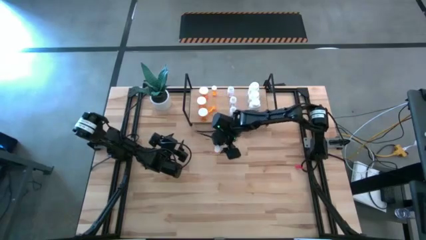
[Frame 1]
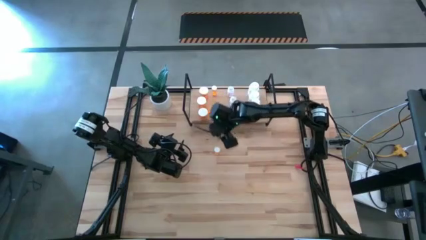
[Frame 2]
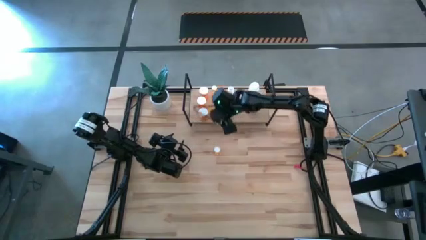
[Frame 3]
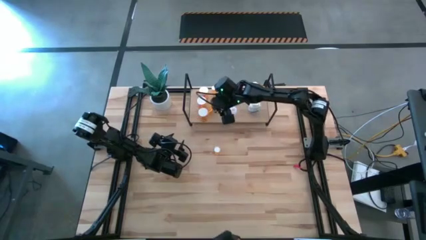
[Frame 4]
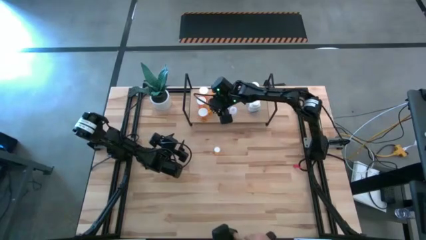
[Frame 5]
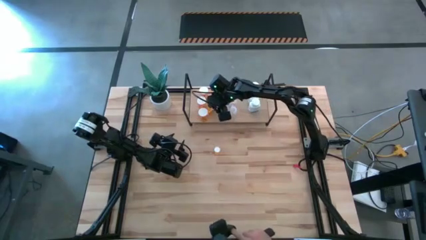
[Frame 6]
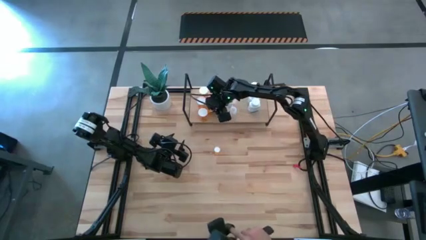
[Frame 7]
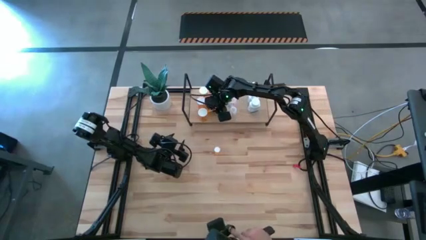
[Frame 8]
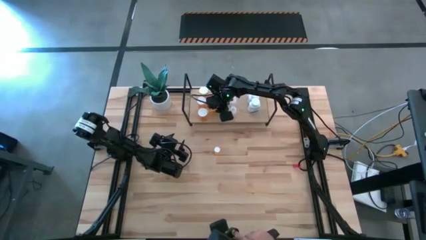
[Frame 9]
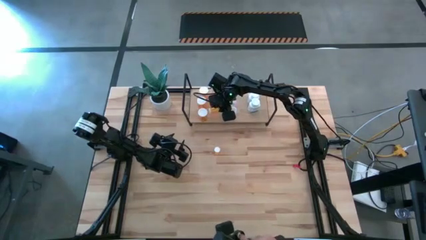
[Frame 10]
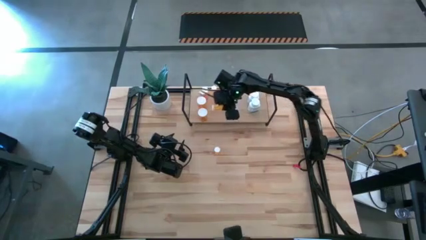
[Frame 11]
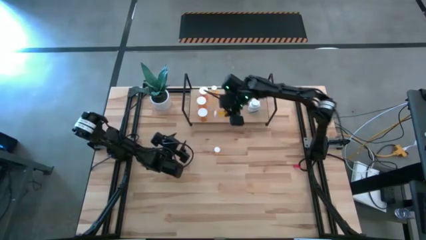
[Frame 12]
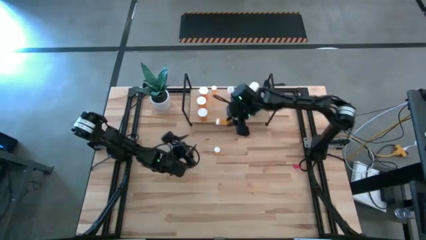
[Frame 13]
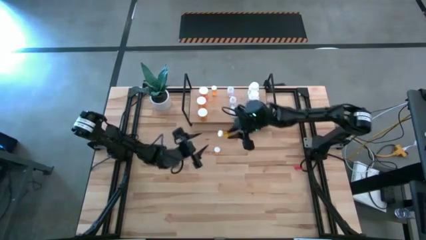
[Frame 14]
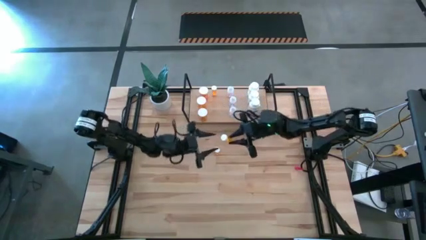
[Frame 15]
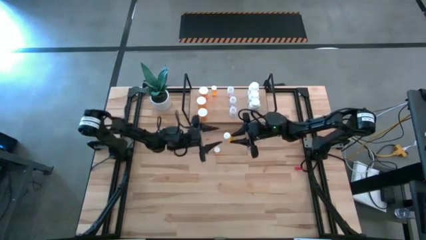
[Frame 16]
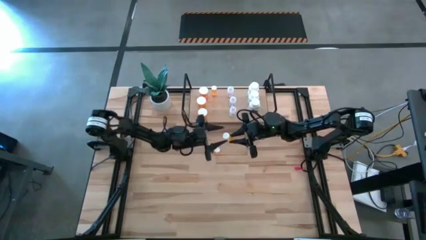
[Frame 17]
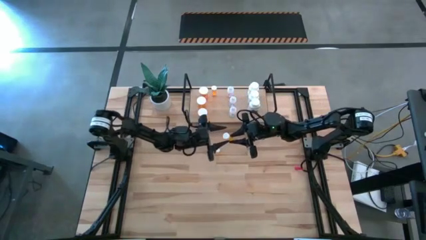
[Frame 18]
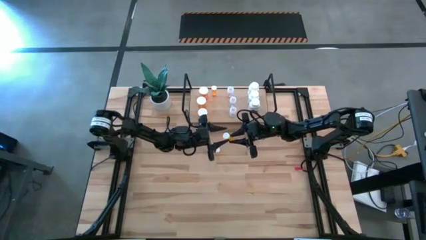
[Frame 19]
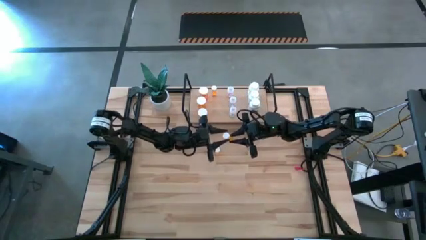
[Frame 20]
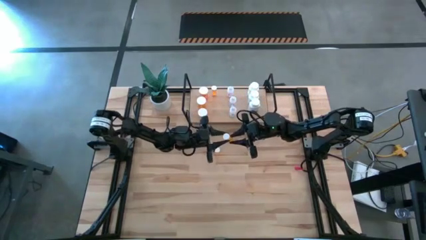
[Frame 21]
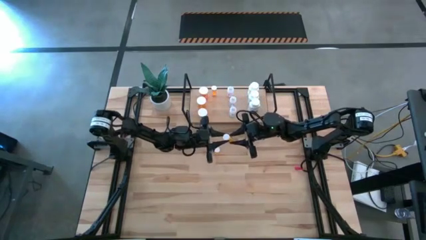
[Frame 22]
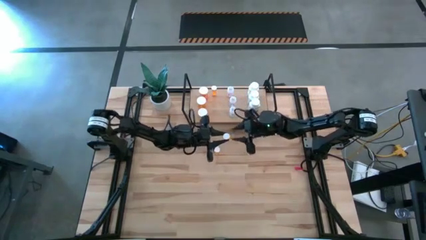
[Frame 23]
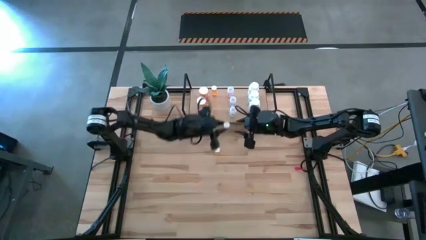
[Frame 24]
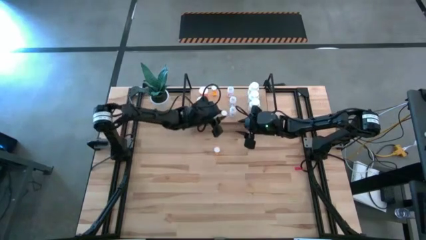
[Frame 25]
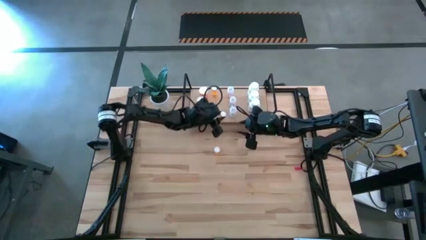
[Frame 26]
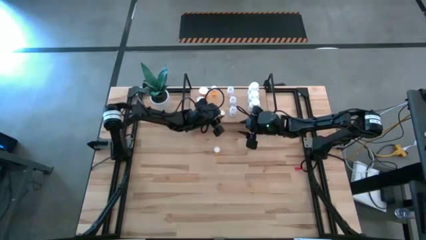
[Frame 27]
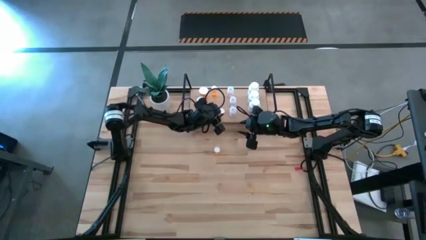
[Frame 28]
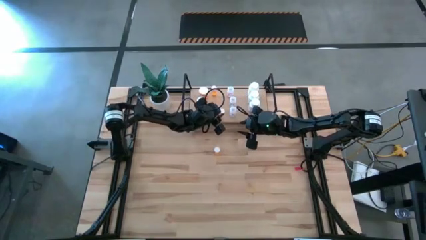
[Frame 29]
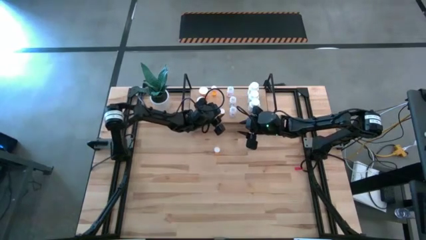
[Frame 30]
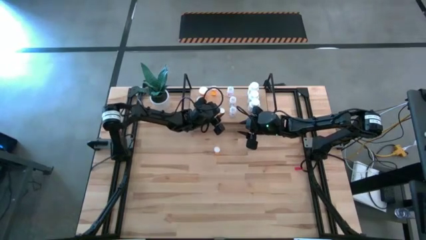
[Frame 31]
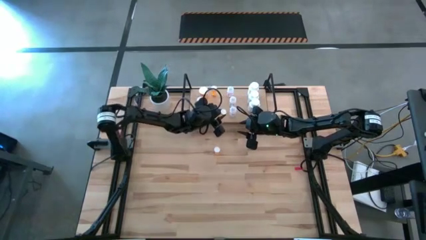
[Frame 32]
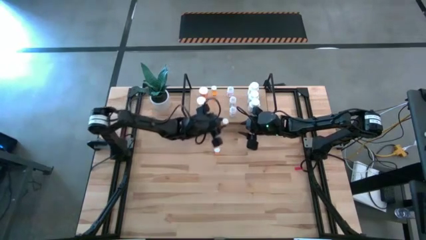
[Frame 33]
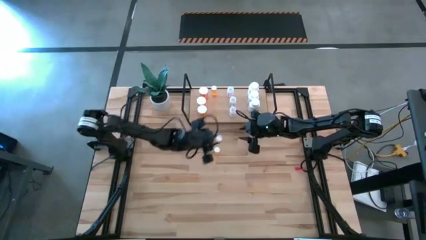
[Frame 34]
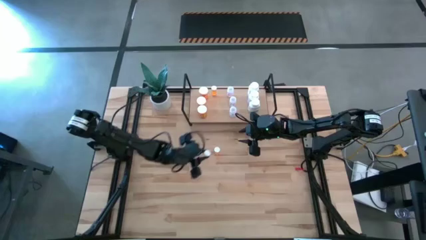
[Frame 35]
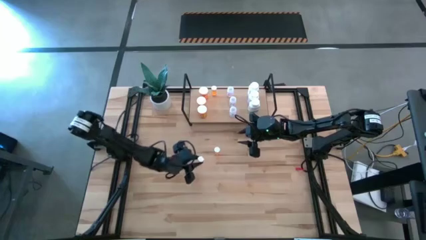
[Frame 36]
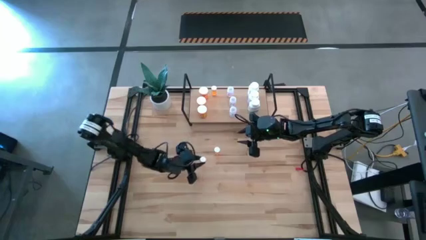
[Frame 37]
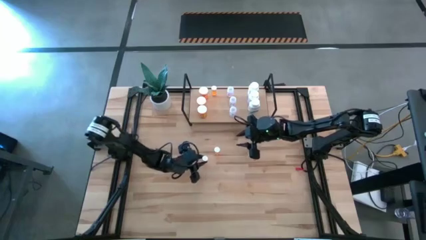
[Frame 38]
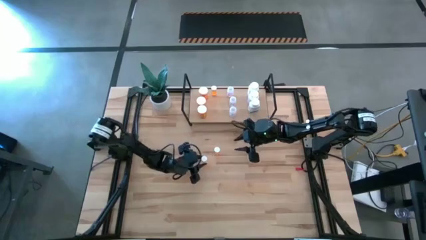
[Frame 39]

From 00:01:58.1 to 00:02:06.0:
Task: Pick and place medicine bottles onto shelf by color
Remove the small orange pill bottle from the shelf

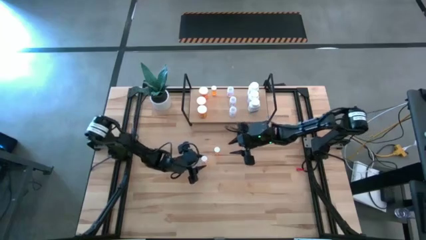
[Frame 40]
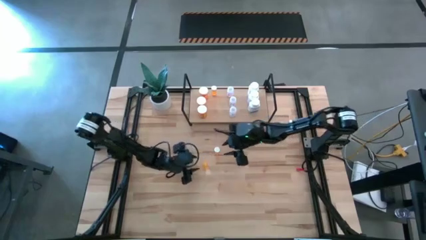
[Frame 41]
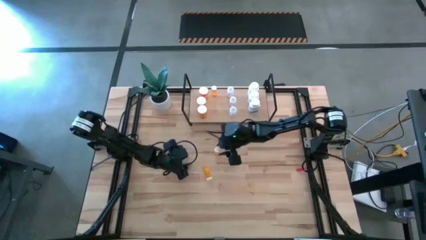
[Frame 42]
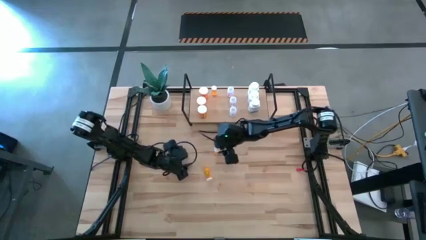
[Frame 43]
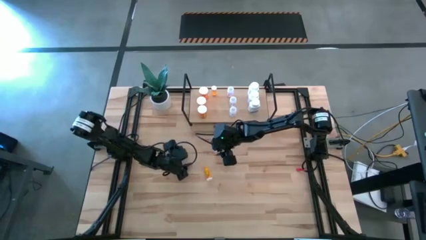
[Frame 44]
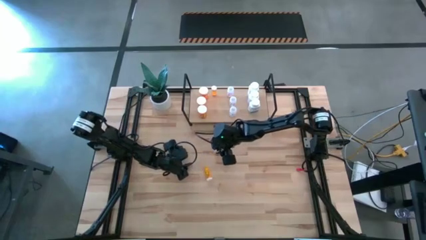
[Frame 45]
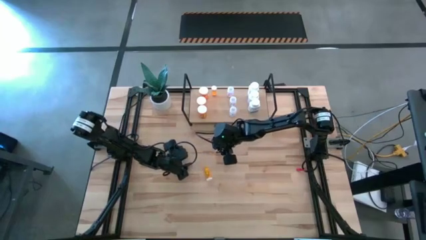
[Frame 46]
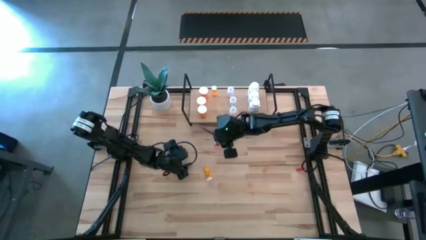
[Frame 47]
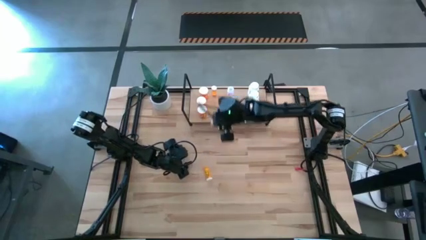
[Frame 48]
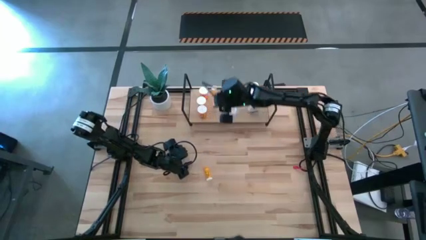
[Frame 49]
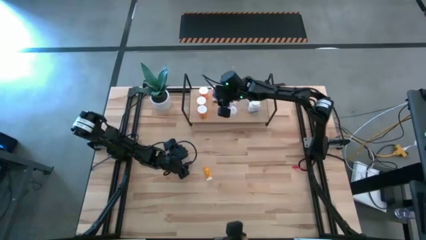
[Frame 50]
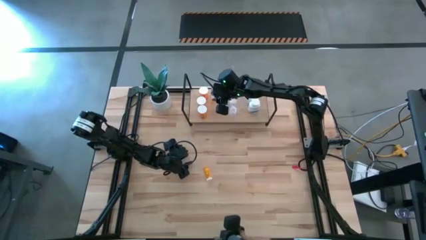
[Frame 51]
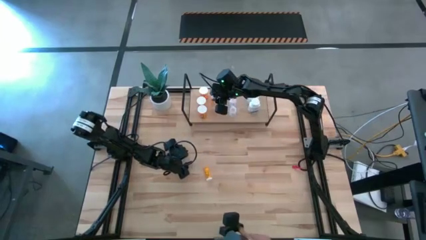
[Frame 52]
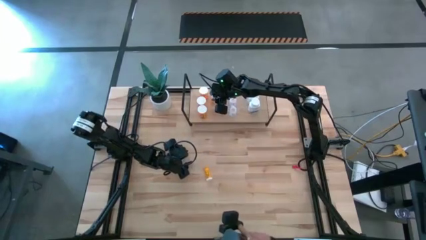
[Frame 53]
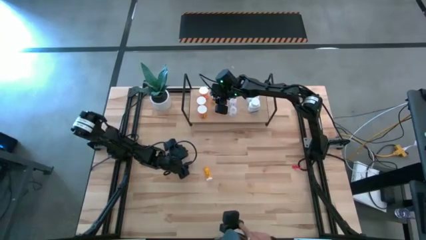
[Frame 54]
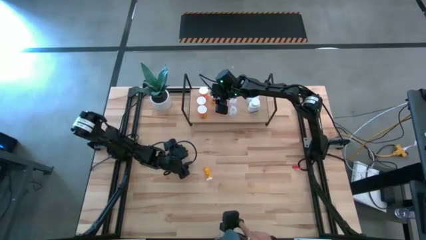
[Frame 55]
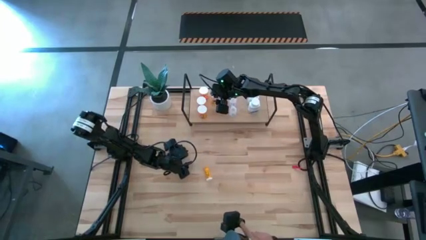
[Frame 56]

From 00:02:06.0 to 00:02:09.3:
Put the top small orange pill bottle on the shelf aligned with the small orange pill bottle

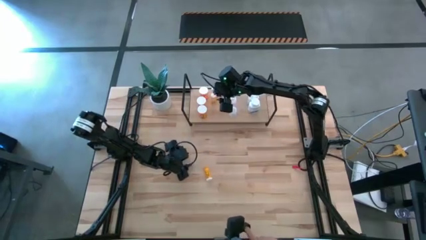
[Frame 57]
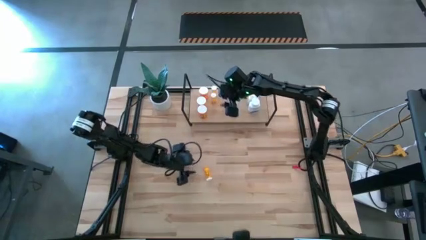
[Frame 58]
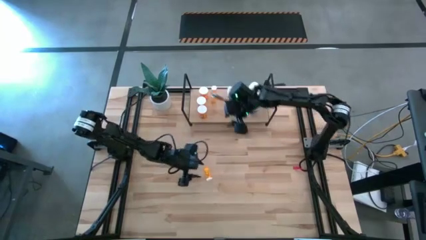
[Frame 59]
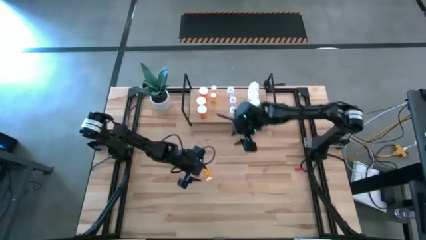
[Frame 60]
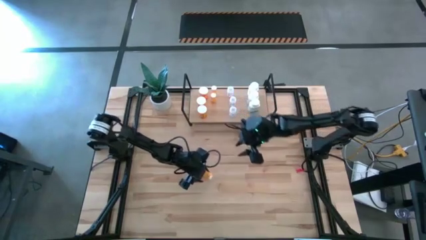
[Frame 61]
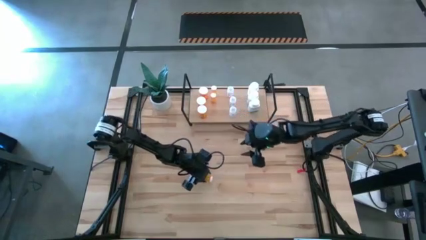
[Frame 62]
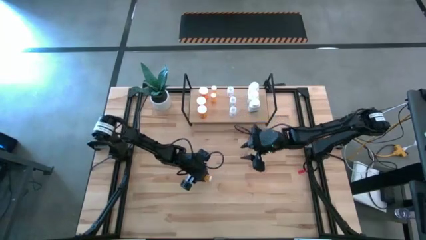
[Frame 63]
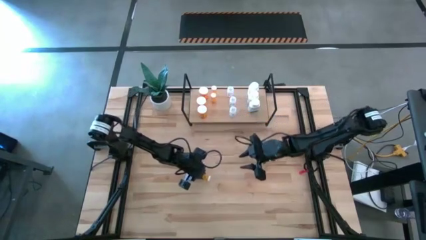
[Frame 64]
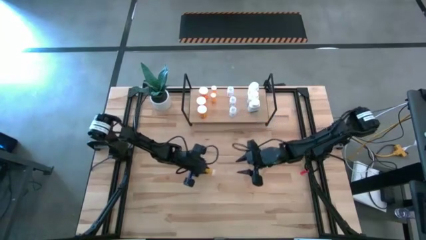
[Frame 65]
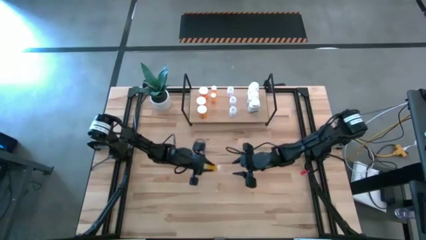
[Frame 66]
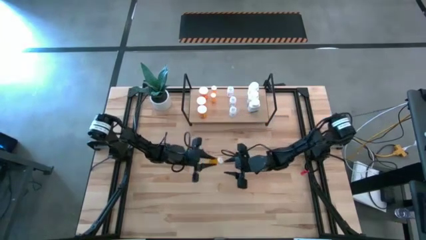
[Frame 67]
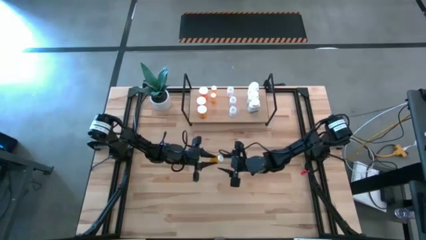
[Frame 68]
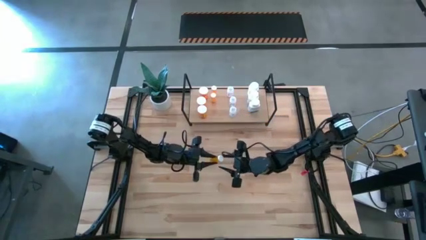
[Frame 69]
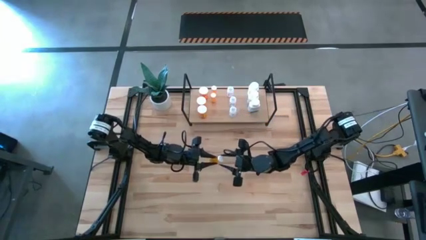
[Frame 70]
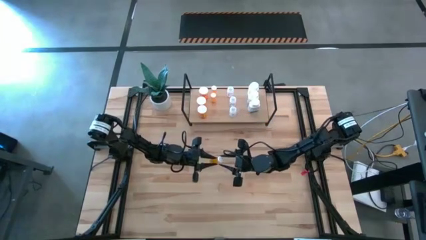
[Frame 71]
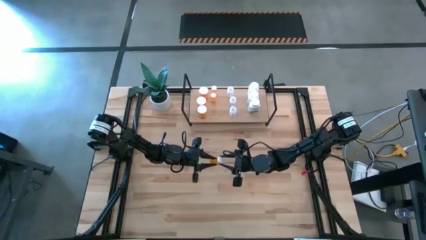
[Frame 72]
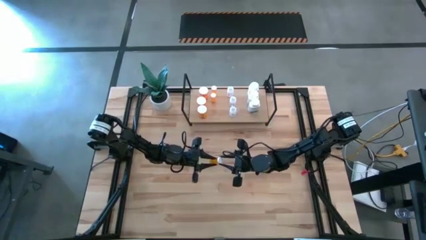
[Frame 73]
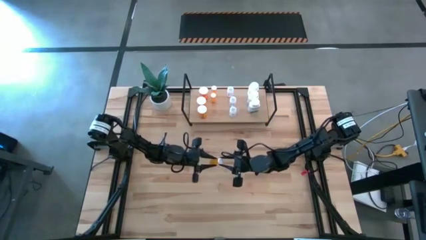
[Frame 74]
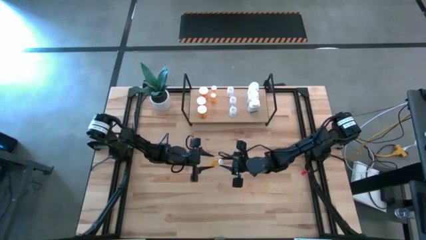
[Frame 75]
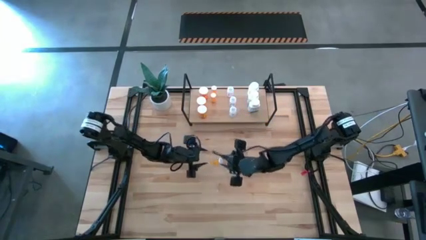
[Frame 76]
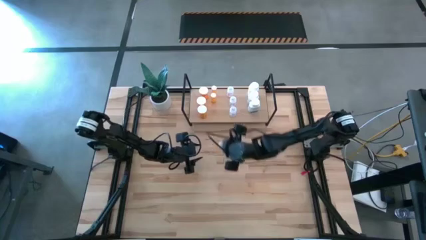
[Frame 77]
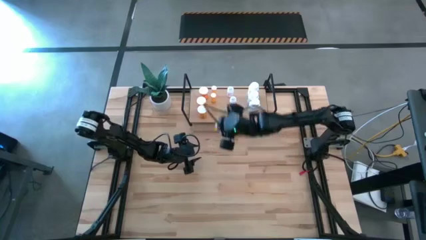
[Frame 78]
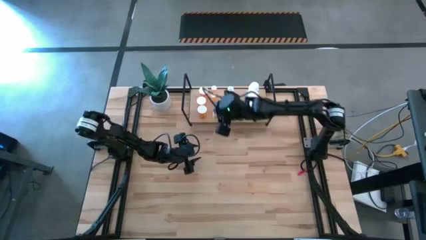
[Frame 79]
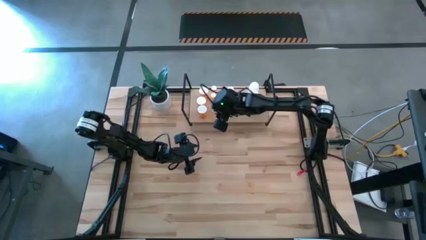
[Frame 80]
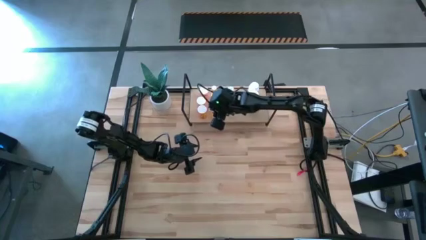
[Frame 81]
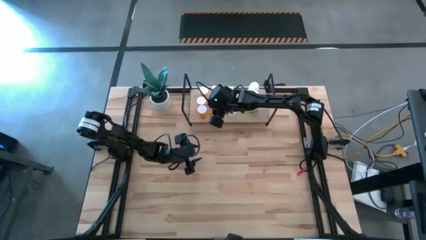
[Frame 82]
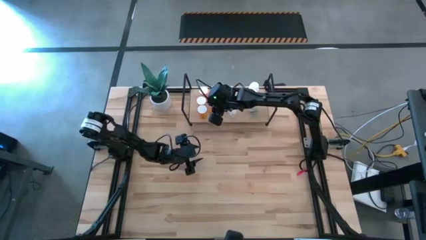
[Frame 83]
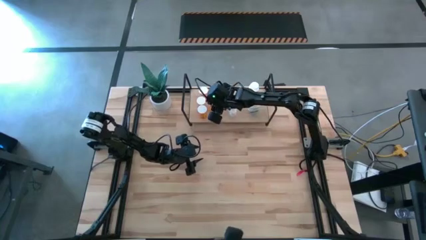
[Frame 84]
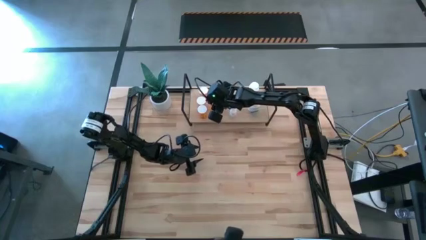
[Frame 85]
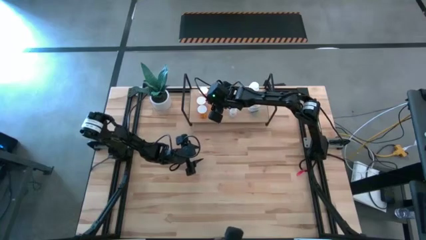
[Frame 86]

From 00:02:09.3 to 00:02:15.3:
Put the small orange pill bottle on the shelf aligned with the small orange pill bottles
